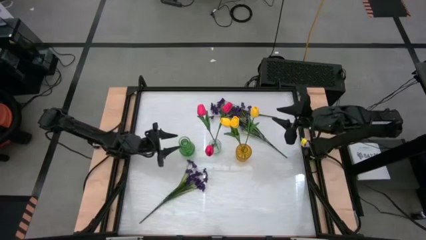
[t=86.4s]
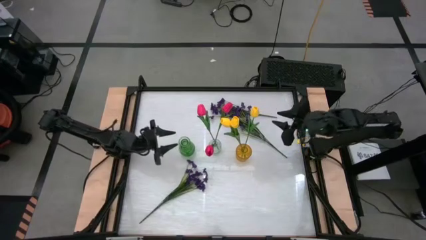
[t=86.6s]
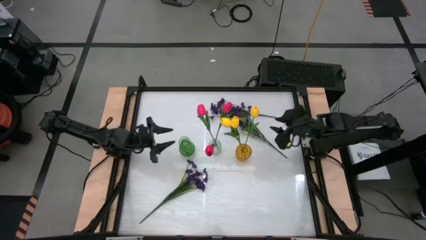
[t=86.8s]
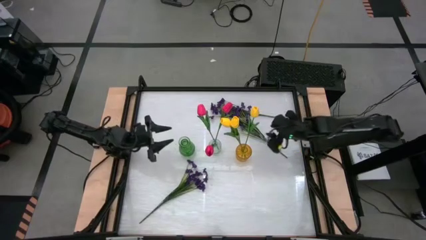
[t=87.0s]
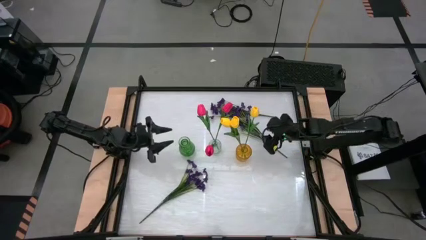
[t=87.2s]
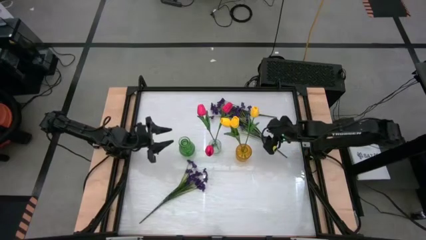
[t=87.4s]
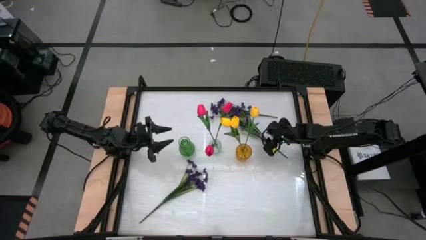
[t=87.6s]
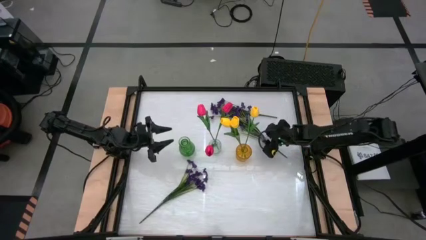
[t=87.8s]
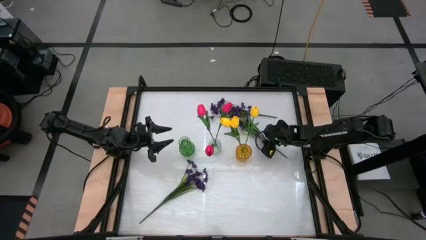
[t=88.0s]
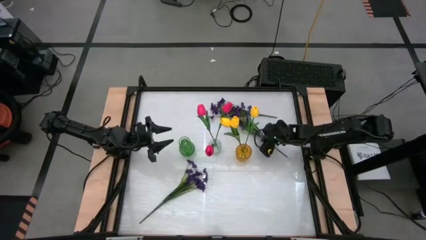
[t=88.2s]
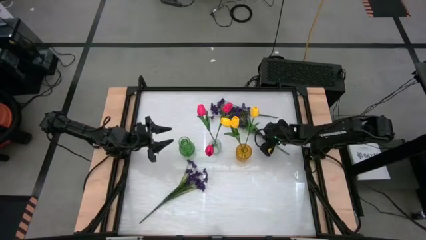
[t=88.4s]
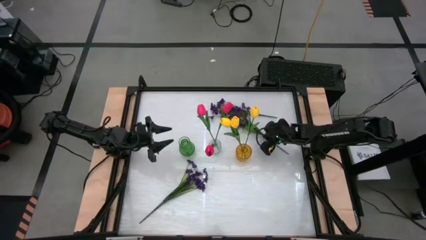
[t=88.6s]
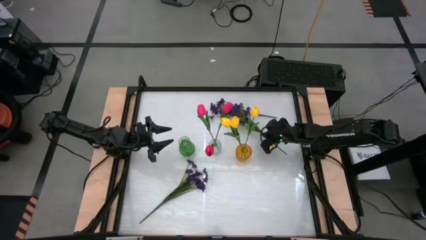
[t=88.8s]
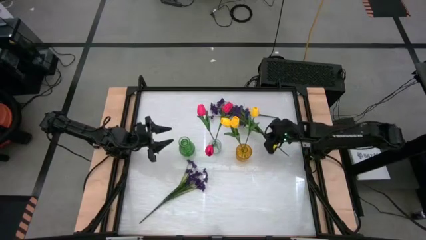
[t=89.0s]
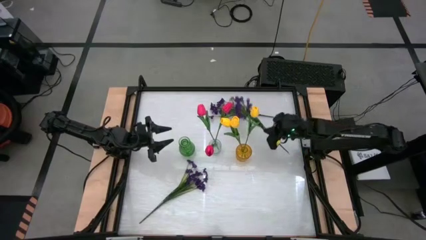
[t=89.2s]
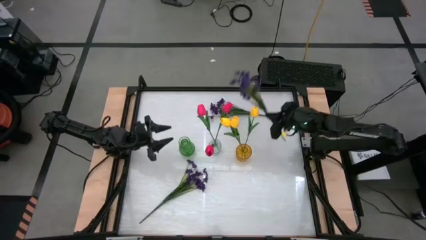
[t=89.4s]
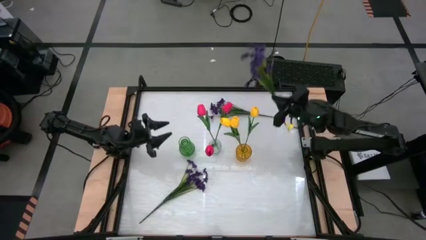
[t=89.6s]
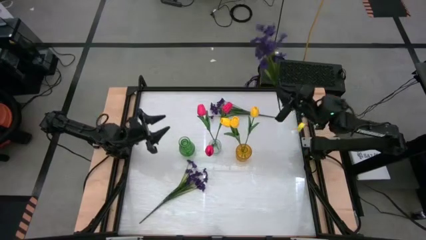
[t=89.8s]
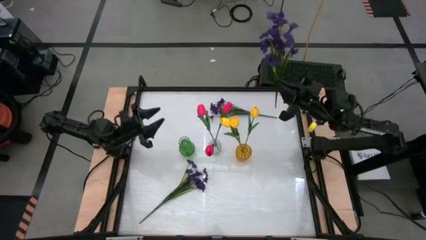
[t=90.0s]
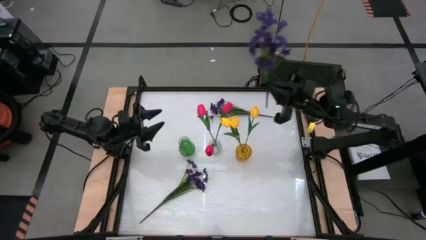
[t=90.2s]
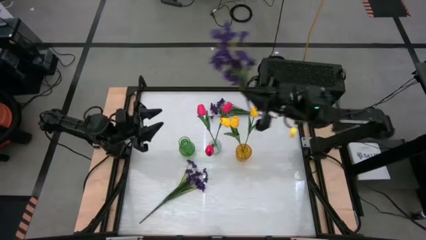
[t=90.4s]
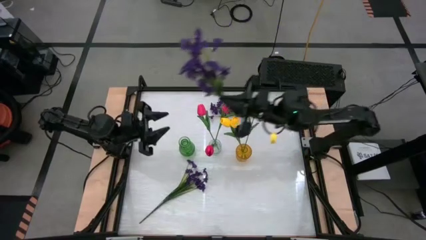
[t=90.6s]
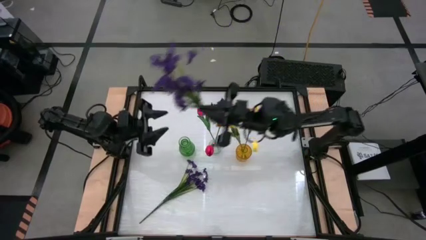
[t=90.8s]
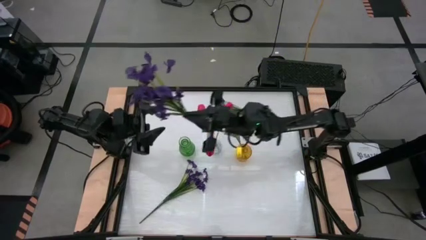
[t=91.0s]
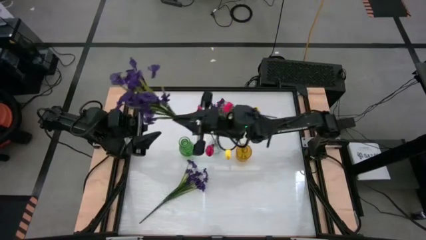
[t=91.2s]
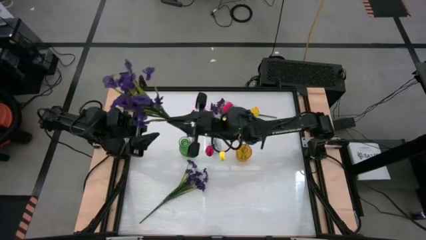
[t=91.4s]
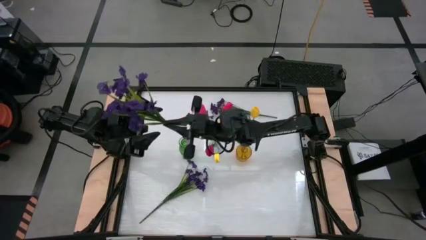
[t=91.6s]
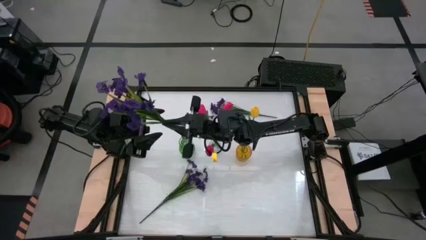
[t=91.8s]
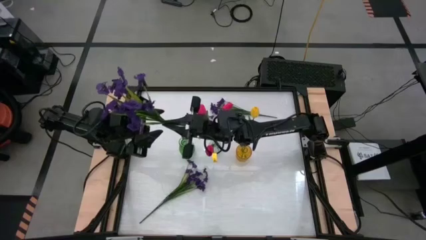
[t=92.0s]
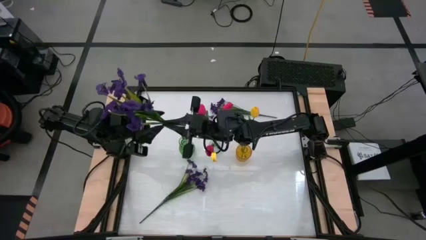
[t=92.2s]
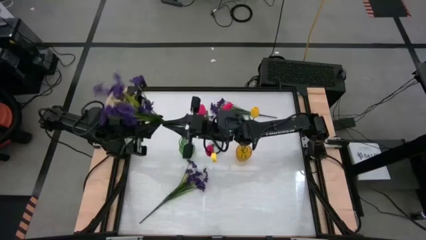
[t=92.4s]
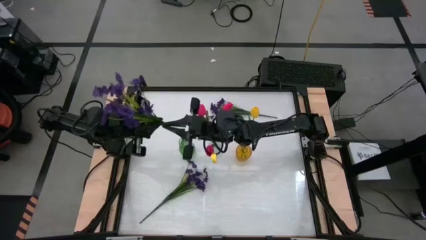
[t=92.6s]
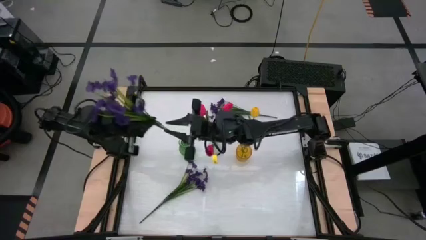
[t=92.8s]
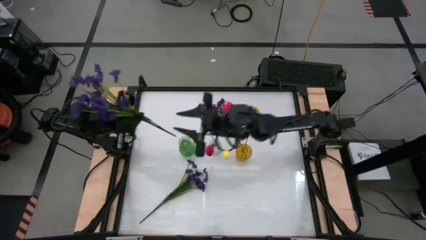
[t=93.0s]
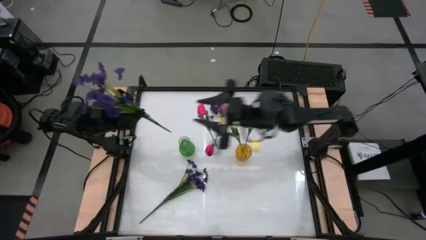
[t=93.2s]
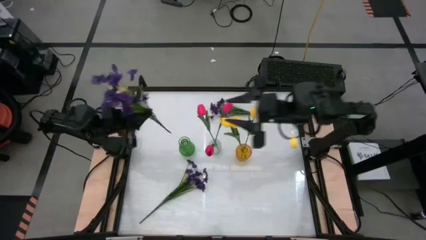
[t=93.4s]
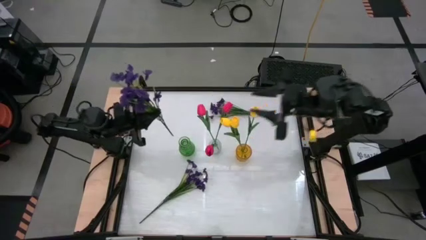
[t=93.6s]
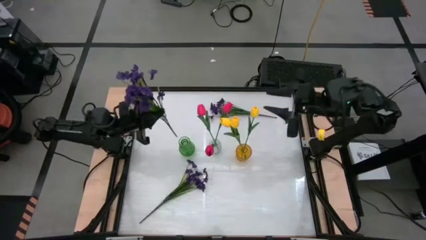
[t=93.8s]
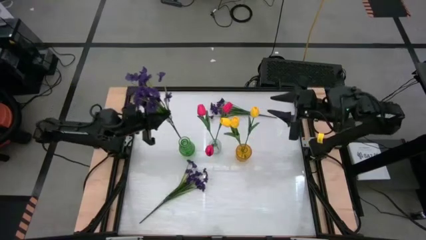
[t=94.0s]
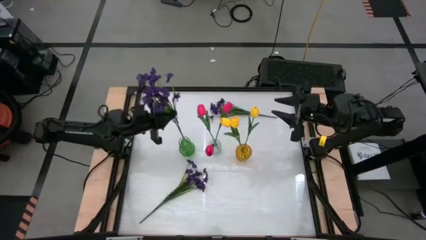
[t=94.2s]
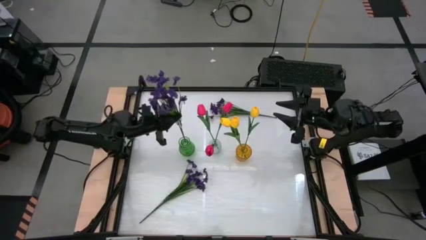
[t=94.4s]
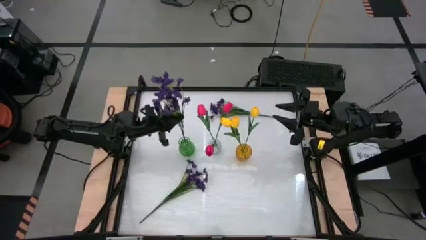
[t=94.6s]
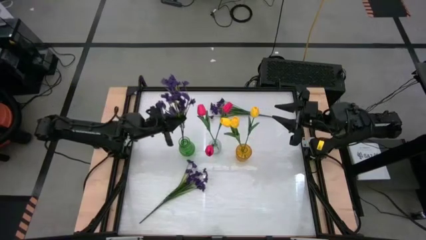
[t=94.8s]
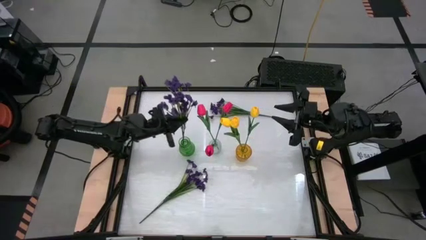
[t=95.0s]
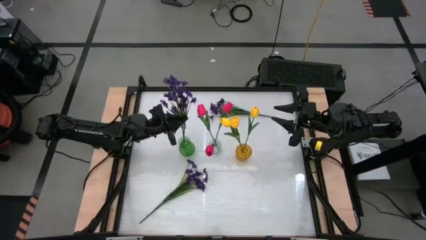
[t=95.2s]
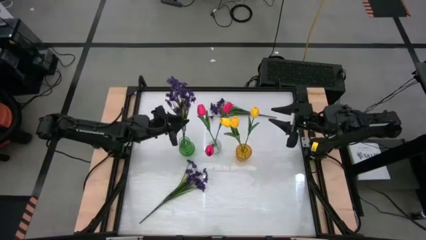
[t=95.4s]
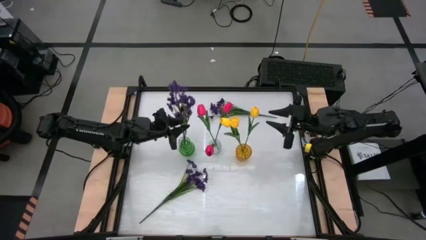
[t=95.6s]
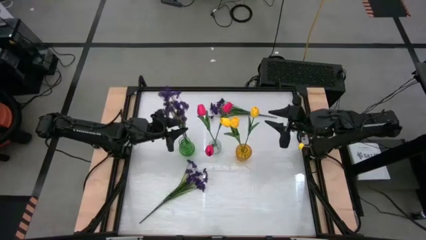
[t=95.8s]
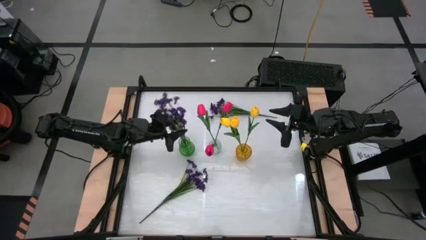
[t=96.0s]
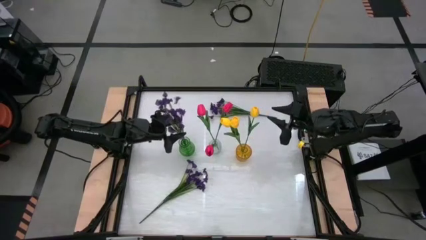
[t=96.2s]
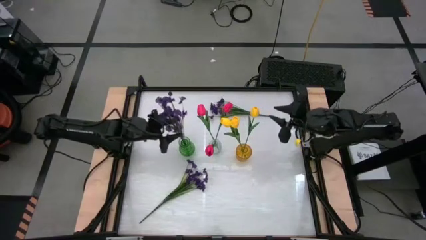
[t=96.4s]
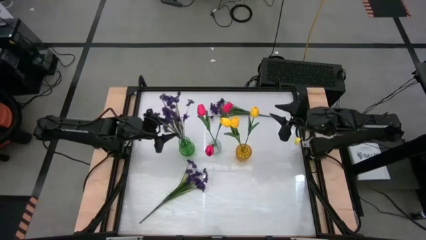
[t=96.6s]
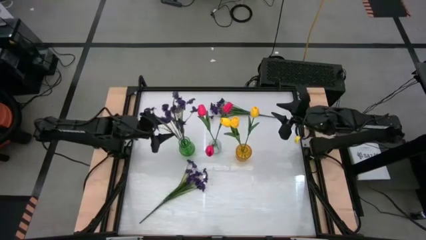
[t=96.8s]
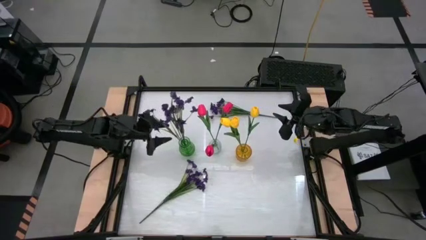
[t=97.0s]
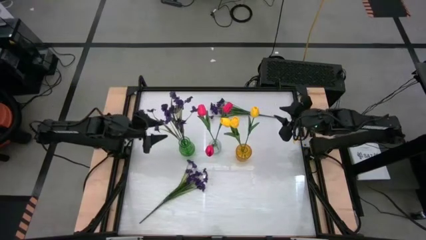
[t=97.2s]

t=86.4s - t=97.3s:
Task: Sort flowers into vase by color
Put the middle purple flowers into the green vase

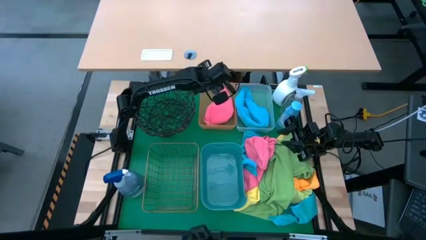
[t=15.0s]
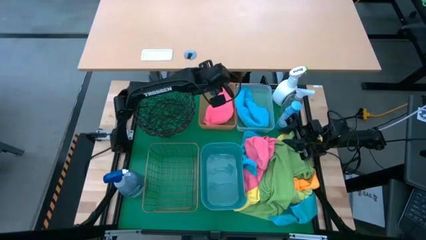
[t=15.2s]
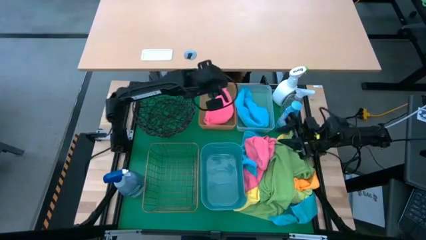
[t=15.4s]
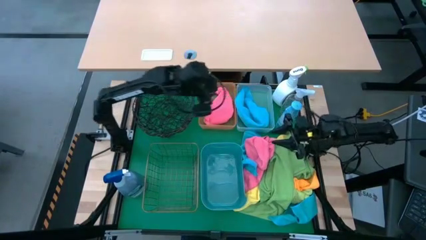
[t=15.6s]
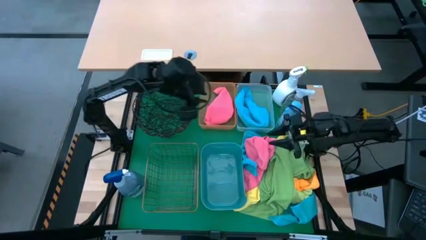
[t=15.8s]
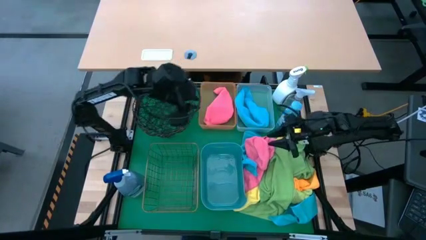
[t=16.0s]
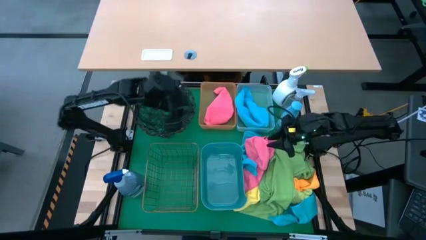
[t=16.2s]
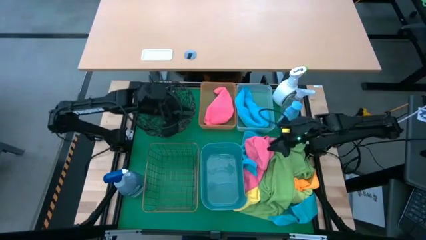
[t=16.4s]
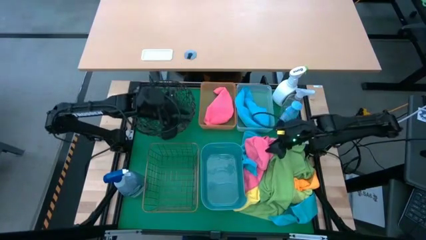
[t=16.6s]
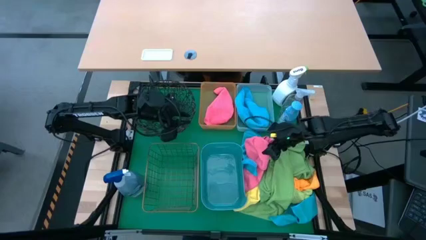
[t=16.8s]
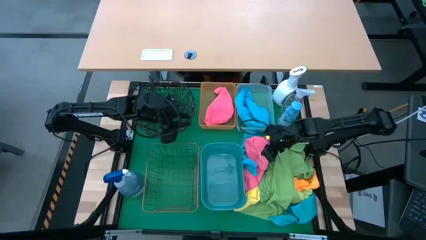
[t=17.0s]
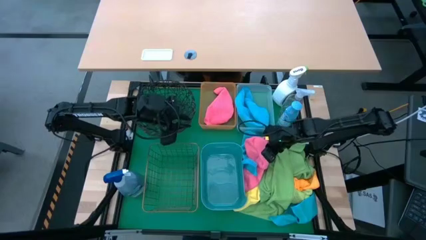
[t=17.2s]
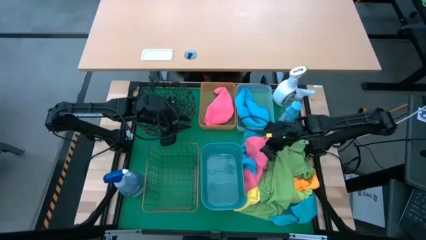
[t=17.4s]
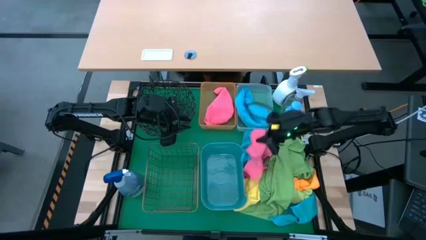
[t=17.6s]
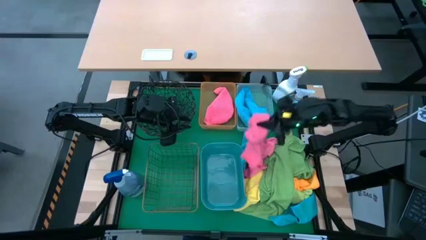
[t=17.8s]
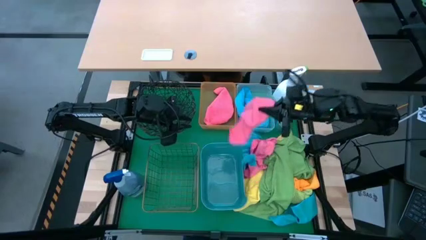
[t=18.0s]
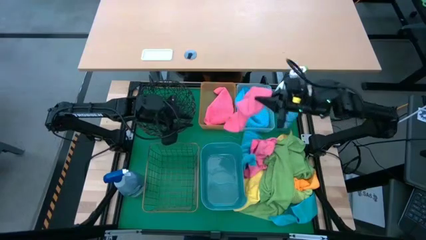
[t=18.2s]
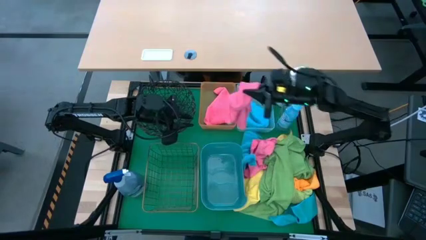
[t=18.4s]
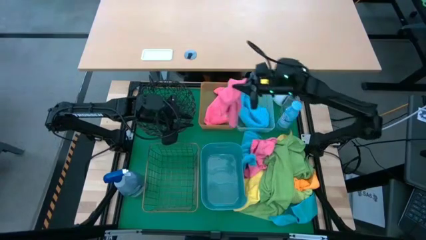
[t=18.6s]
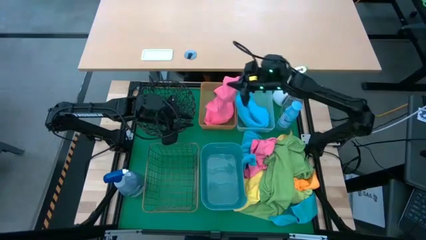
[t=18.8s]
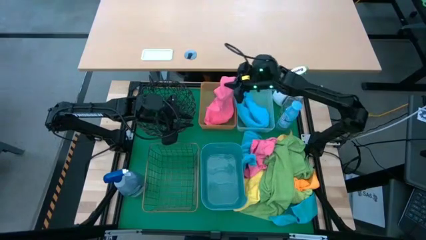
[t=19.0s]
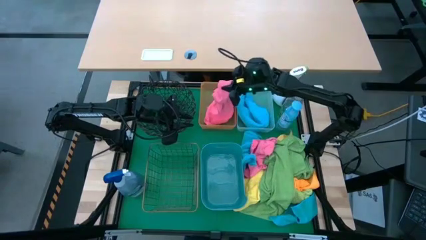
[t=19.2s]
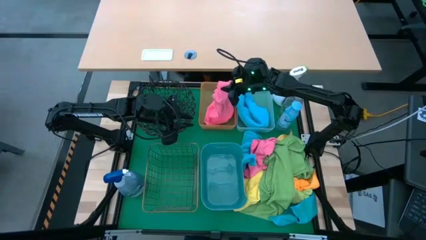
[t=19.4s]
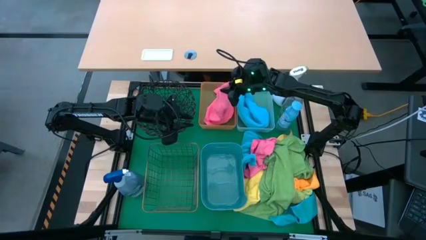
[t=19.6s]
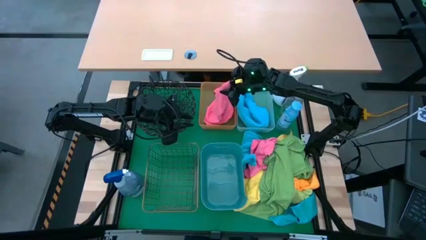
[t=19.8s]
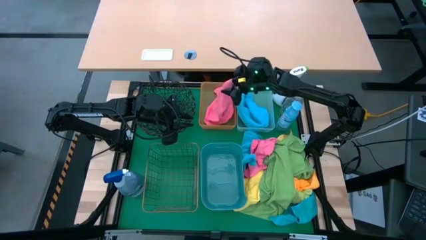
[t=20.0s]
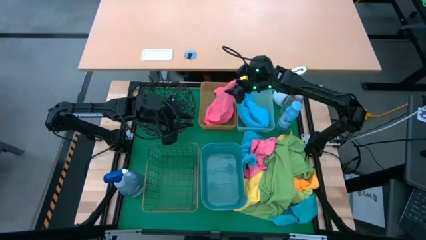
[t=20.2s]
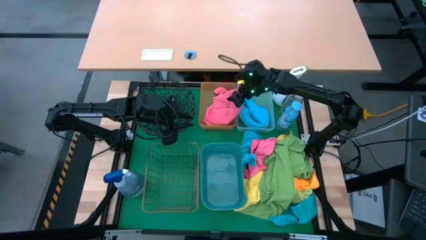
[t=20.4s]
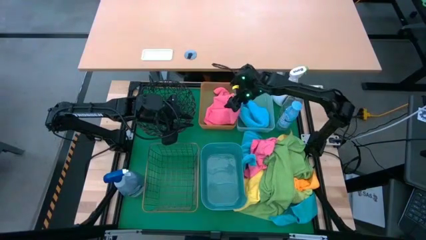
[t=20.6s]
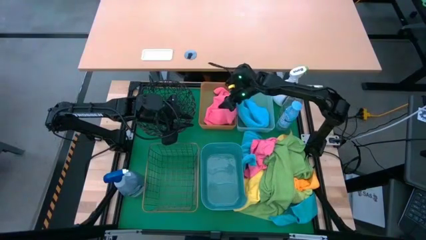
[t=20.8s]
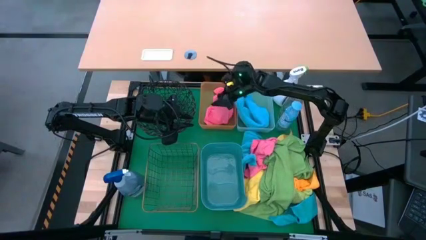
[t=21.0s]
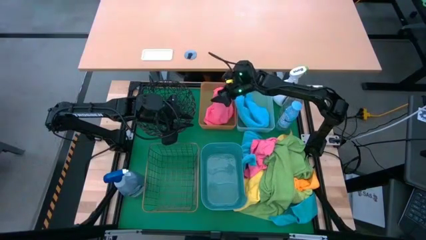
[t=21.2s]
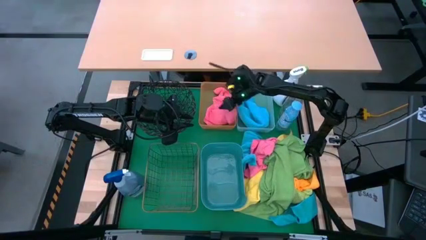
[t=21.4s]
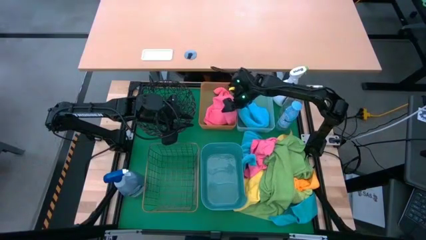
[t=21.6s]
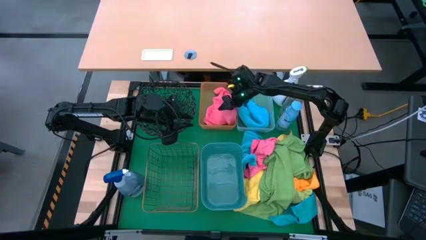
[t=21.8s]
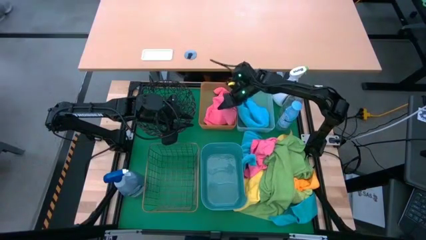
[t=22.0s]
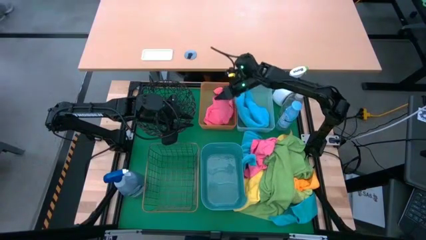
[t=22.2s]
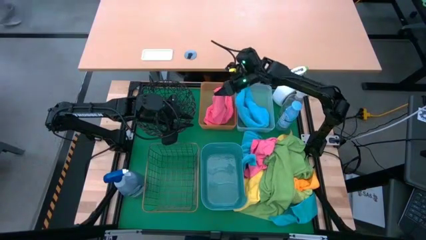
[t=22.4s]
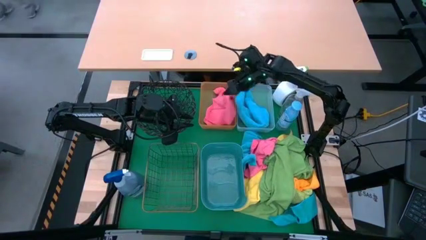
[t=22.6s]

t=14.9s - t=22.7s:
Task: Sort microfiber towel by color & place in baskets
Put the pink towel into the orange bin
